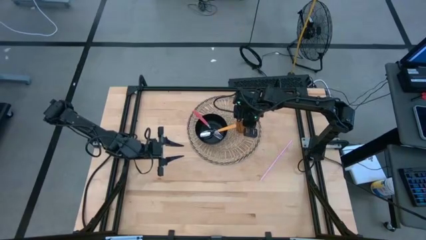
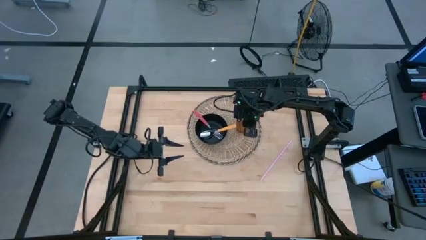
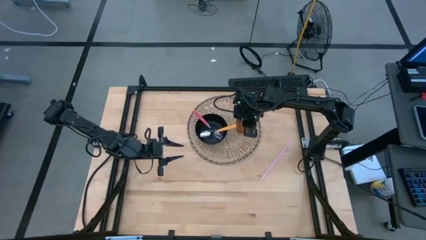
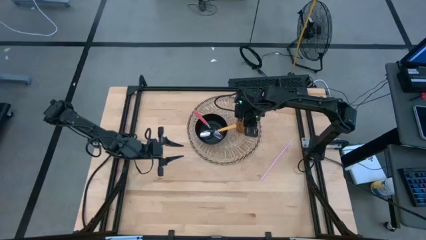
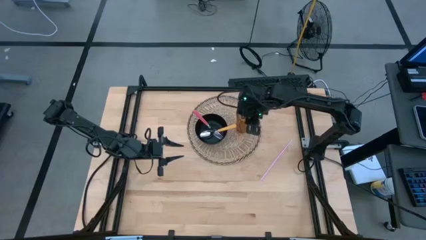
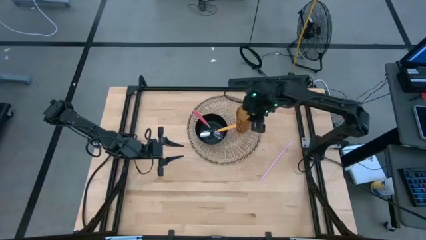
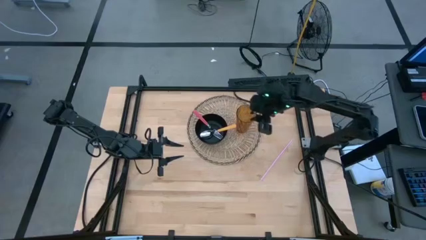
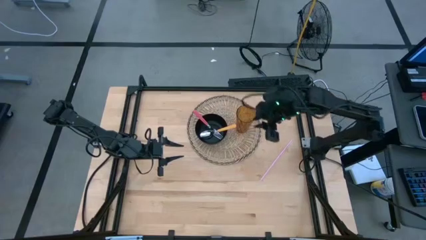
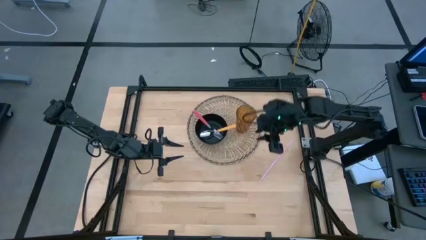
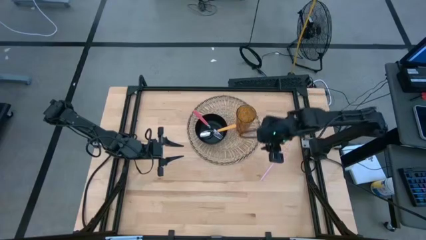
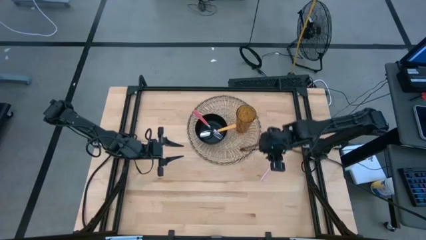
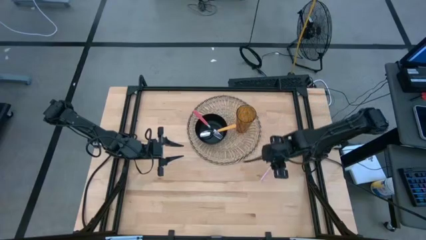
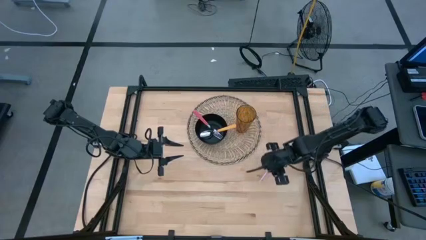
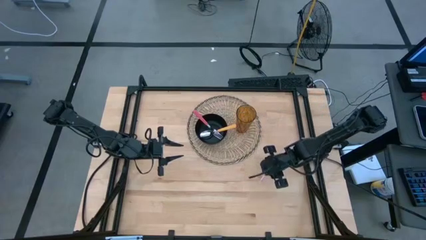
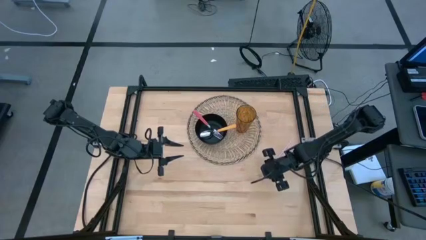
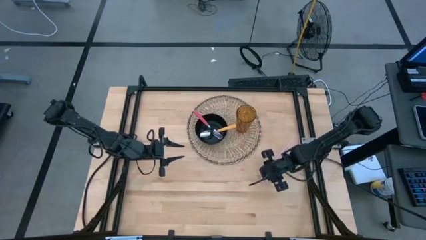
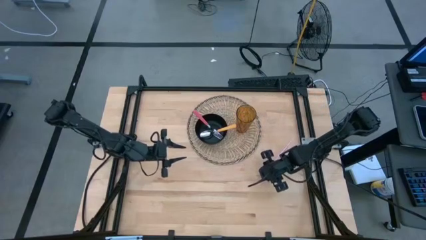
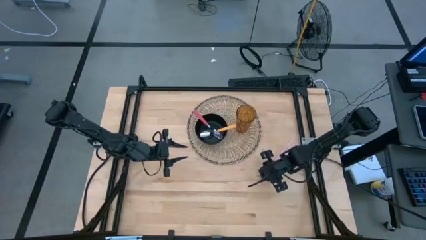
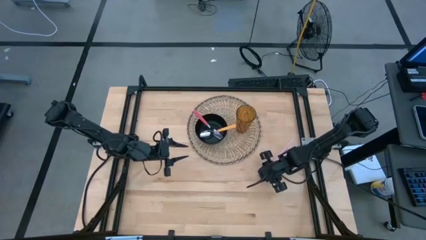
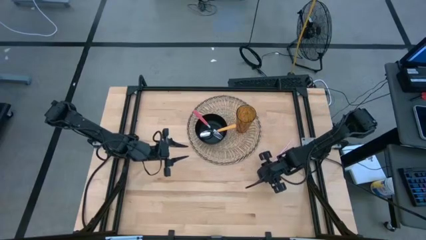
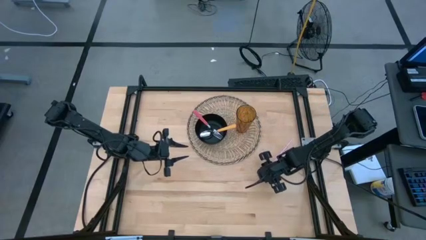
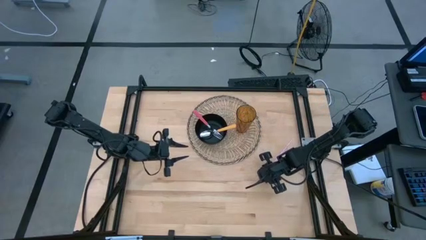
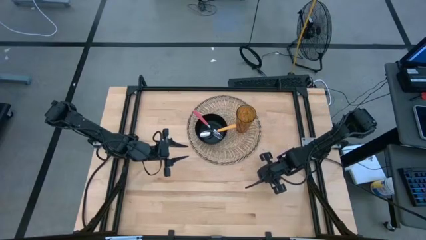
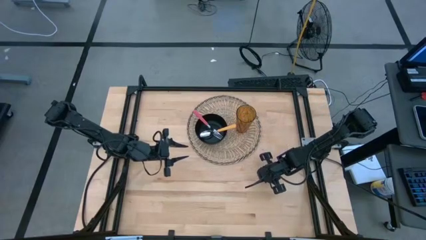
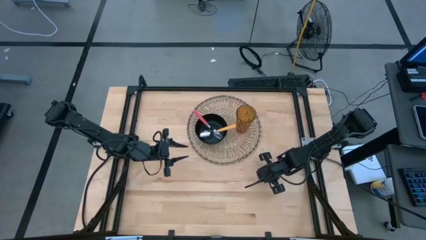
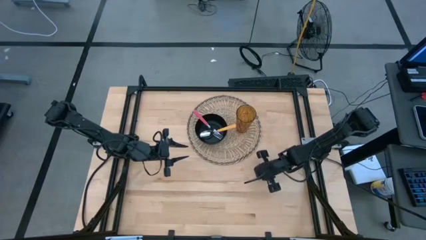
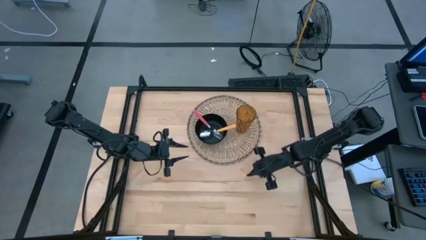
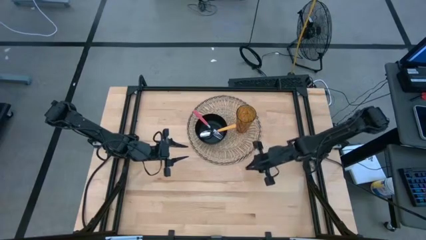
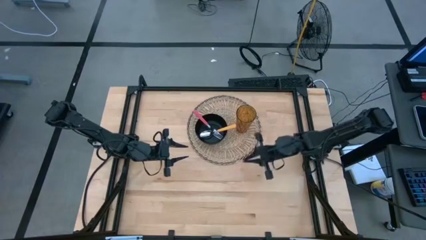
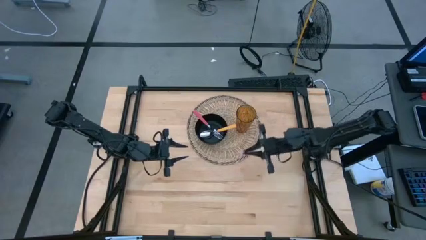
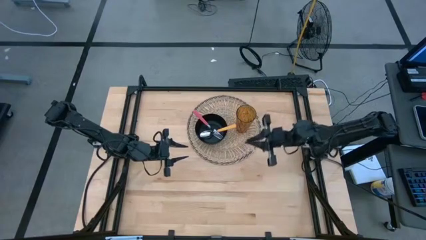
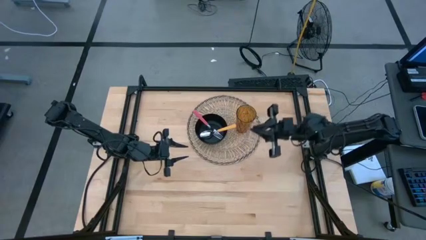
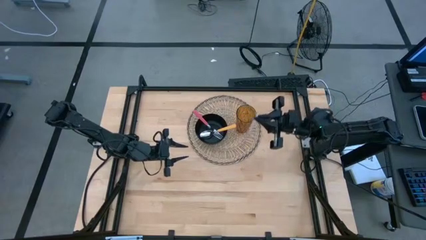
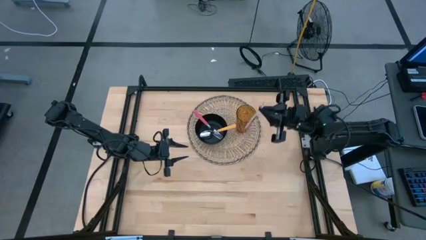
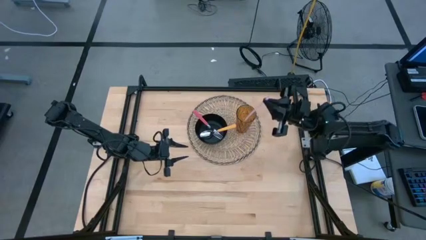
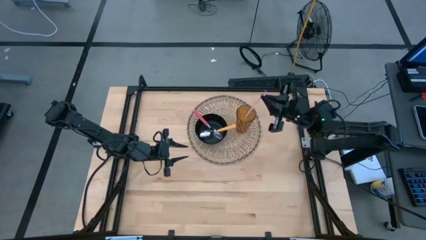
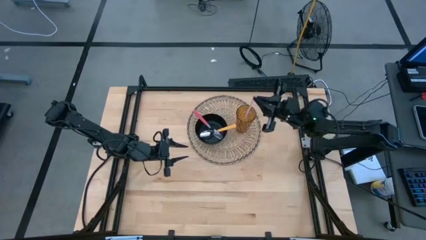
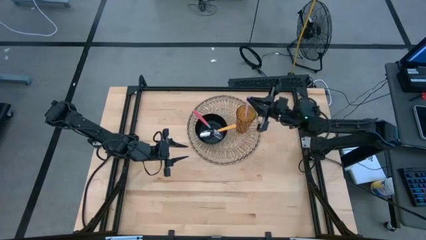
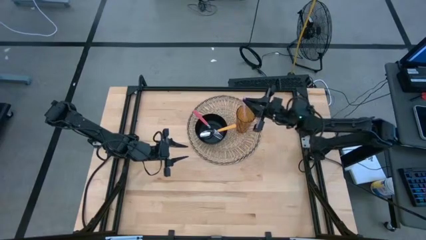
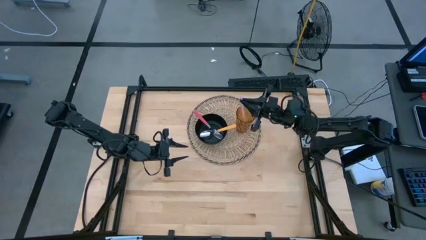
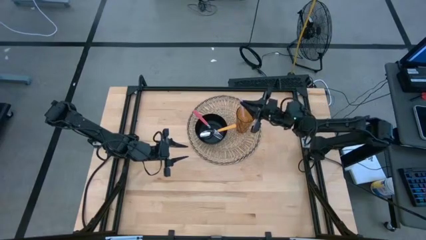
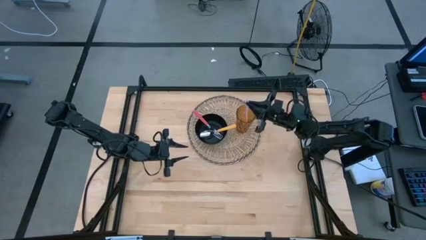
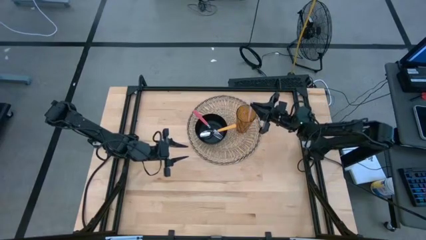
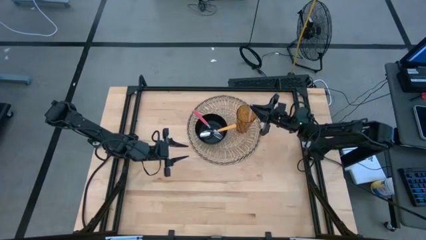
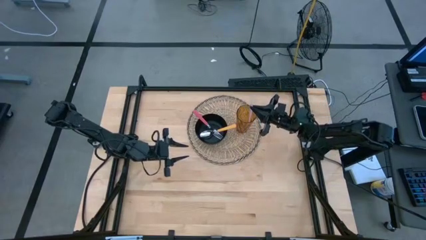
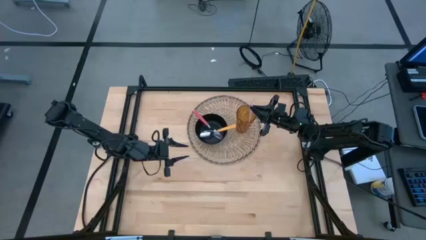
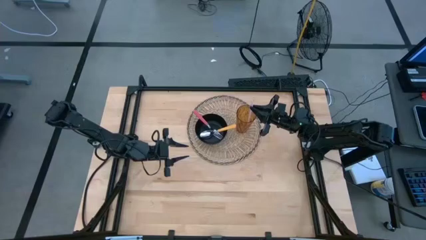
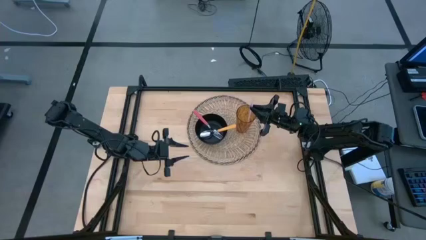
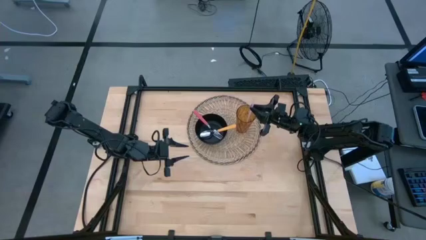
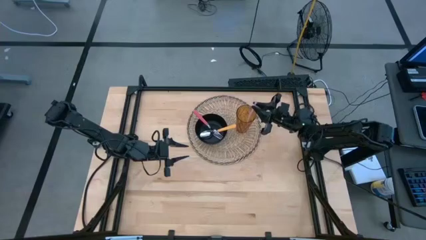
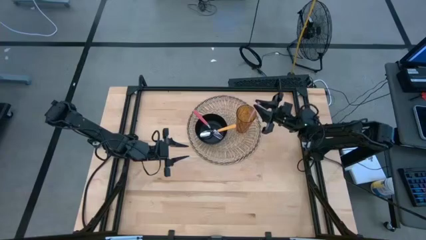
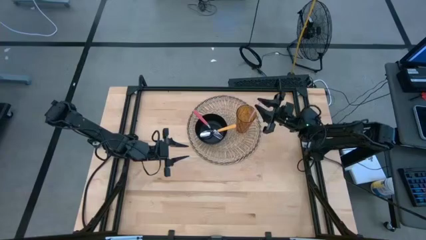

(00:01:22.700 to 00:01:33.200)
Task: Pick & Place Utensil
Put the pink straw into the brown cup on the brown mat

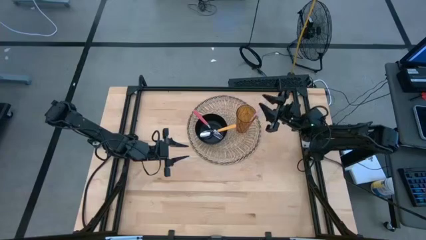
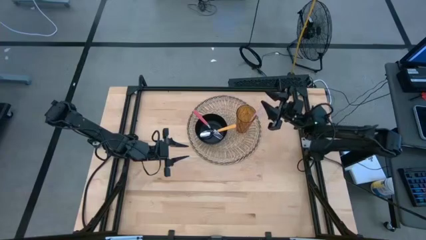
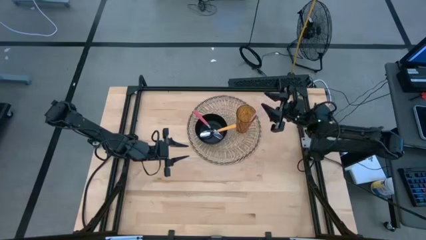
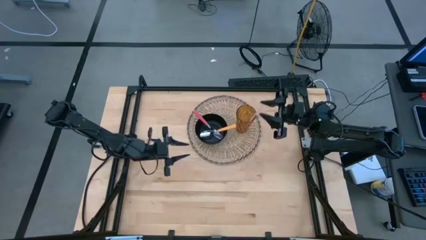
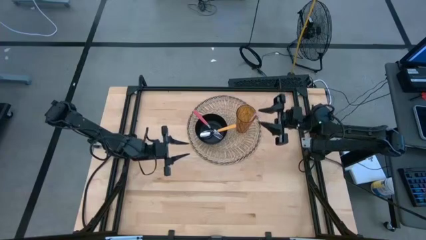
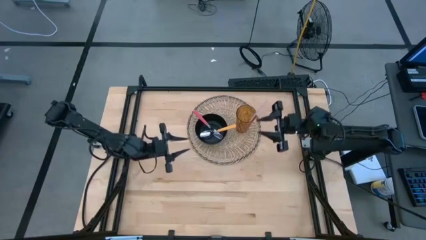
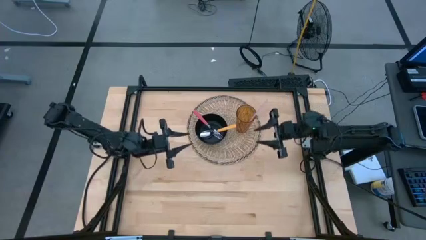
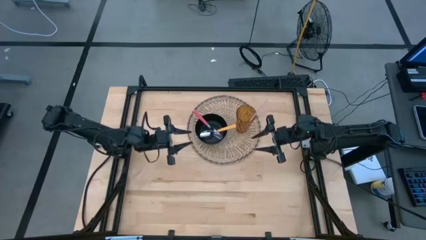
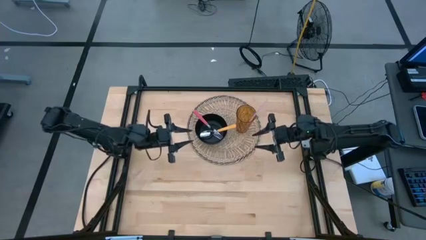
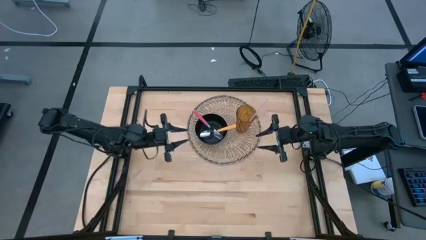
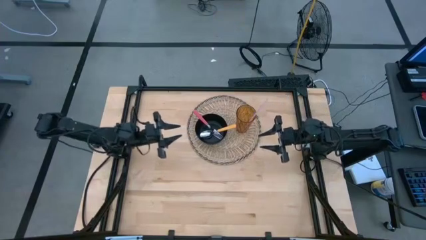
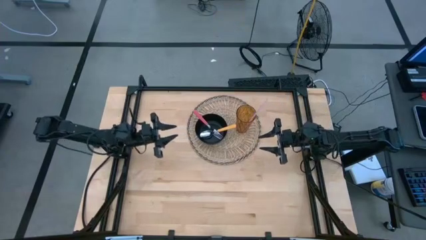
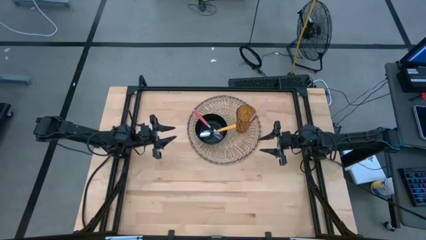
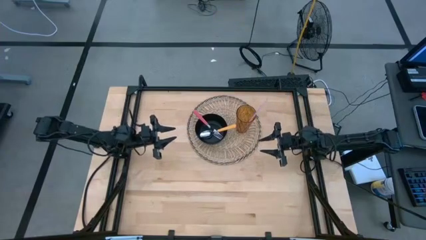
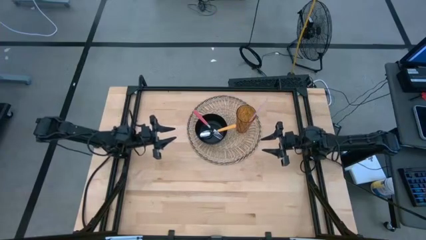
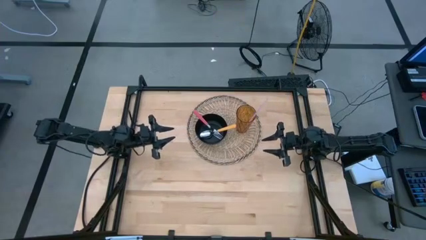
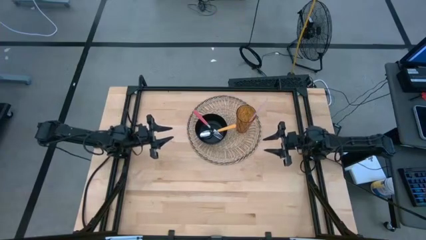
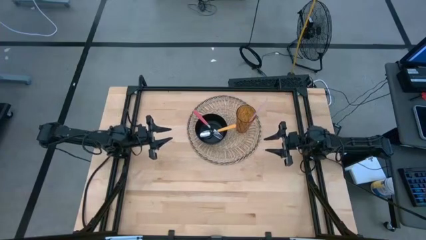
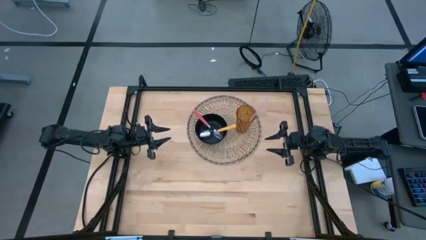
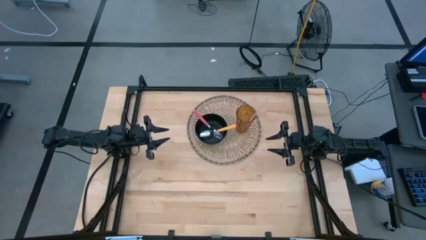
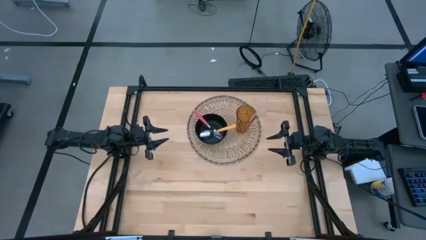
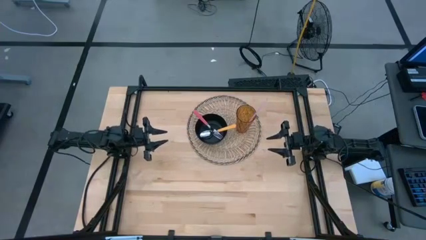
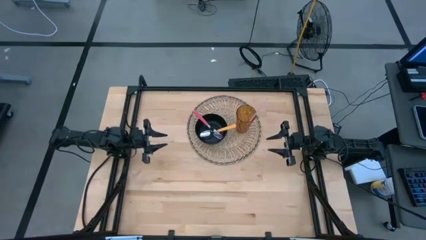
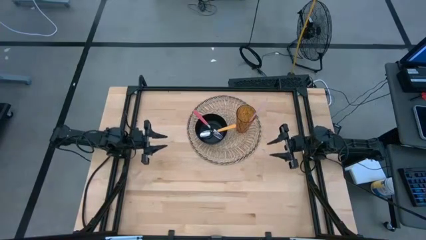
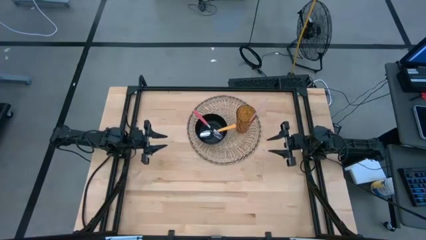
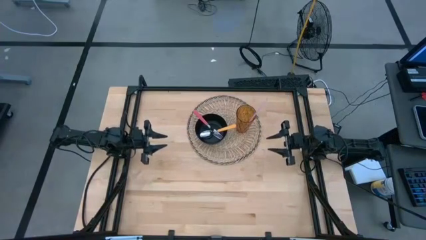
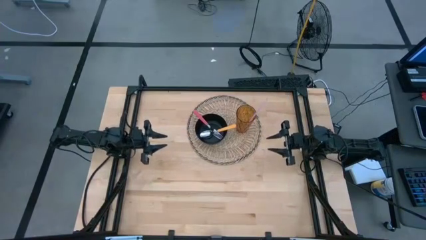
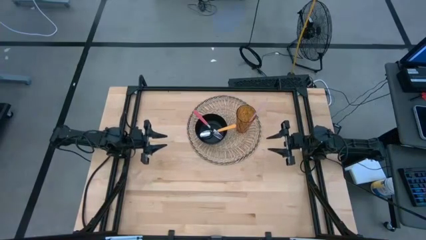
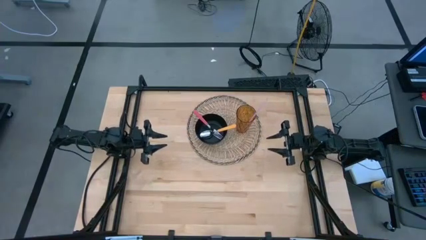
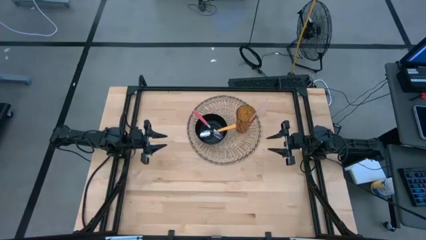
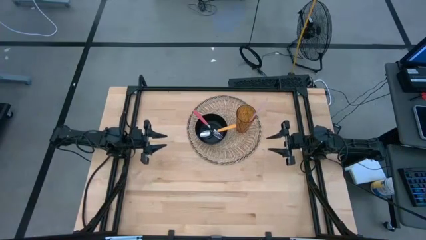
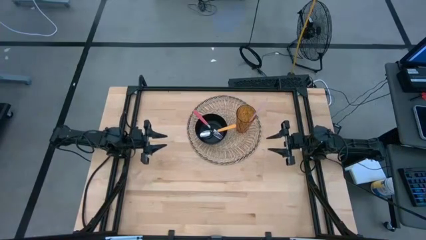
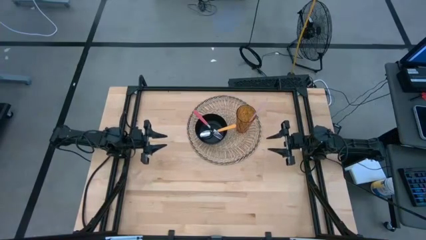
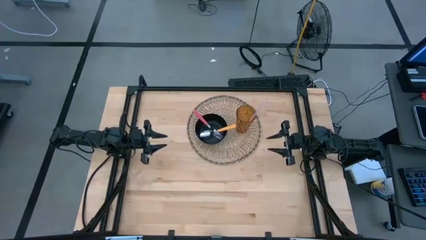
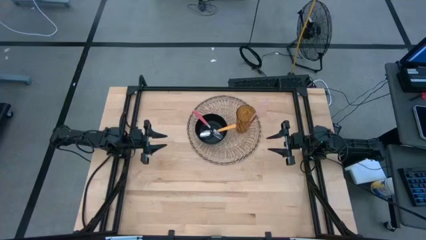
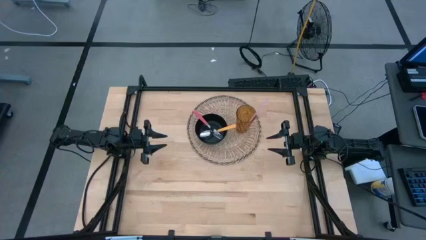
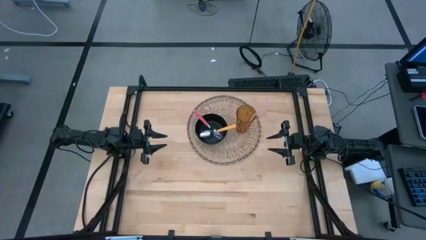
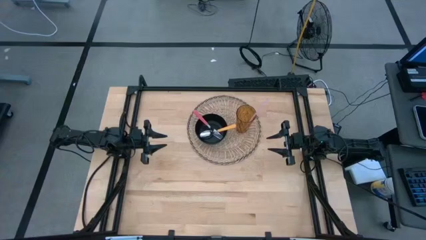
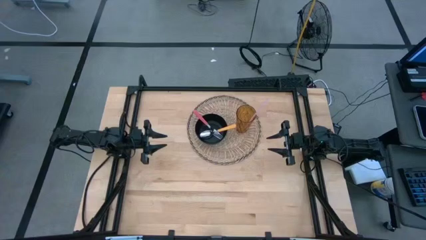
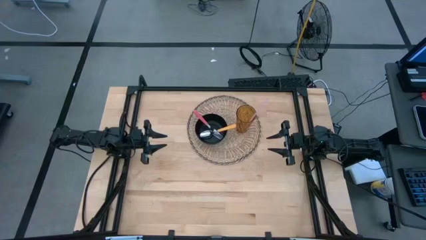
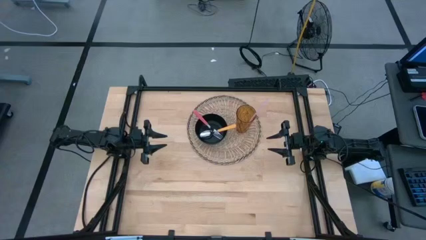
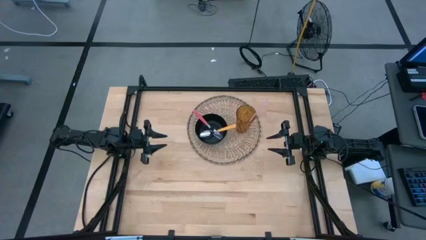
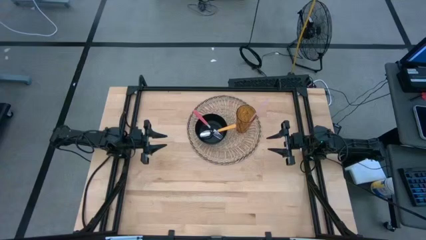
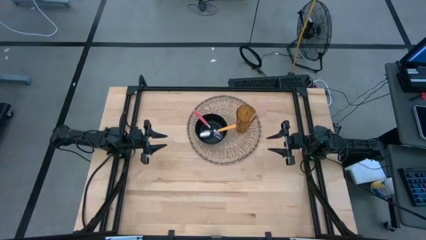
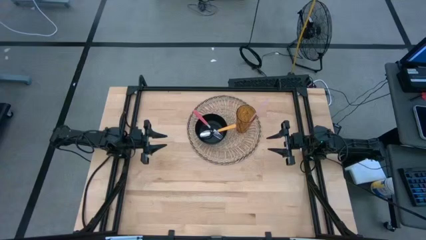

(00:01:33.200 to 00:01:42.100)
Return to Home Position
